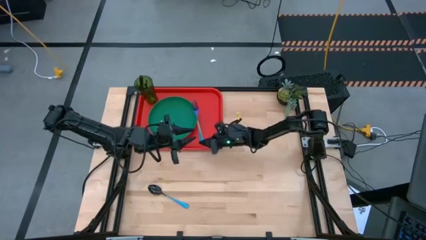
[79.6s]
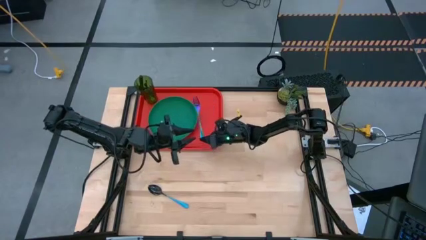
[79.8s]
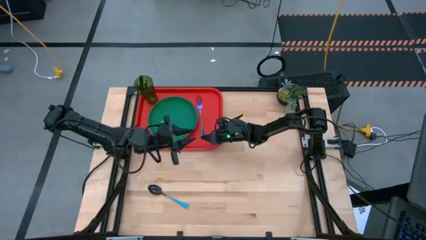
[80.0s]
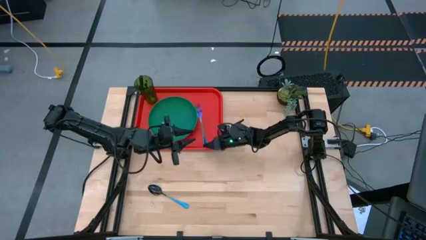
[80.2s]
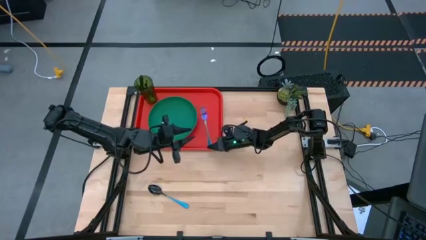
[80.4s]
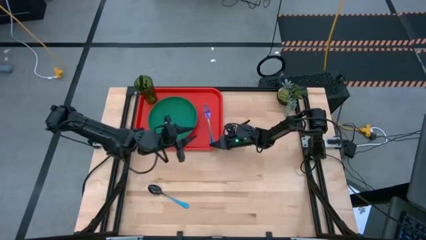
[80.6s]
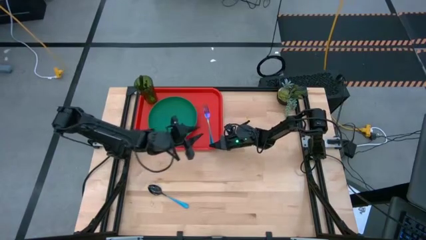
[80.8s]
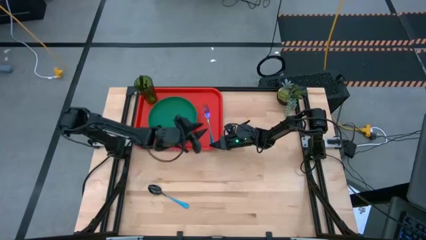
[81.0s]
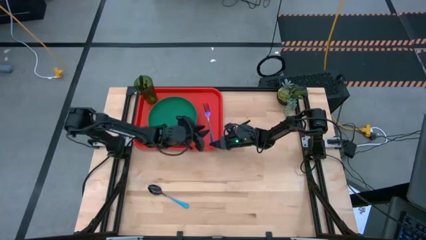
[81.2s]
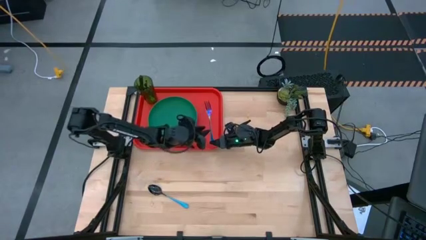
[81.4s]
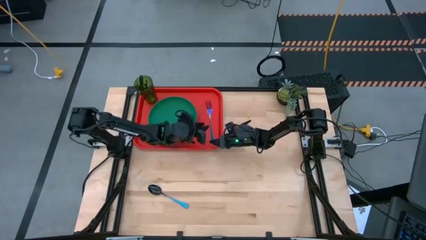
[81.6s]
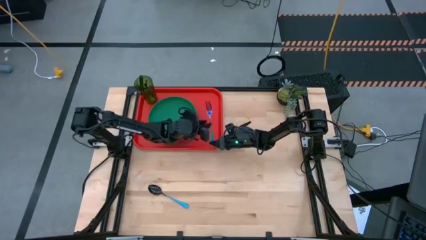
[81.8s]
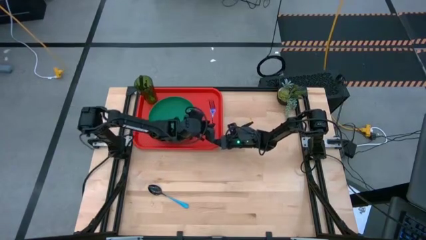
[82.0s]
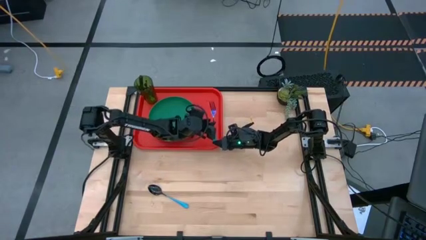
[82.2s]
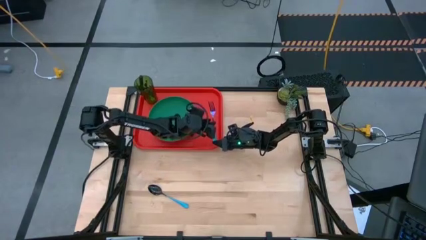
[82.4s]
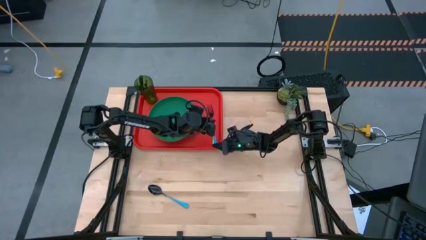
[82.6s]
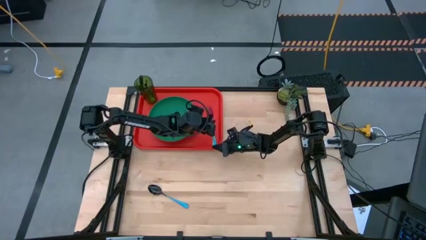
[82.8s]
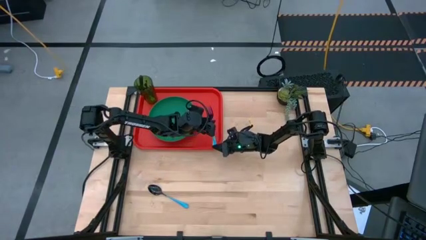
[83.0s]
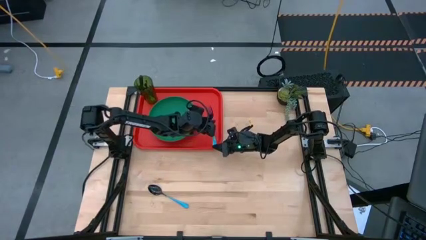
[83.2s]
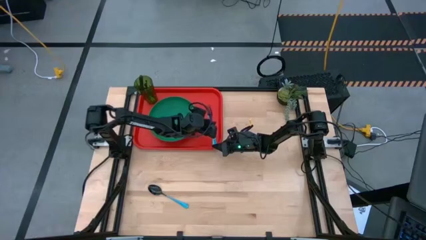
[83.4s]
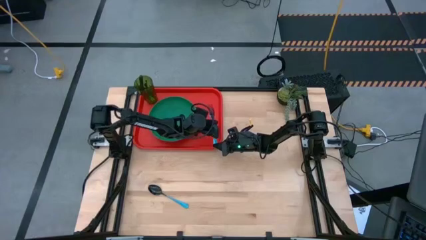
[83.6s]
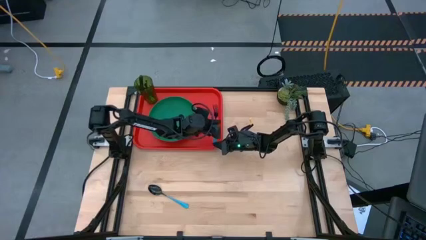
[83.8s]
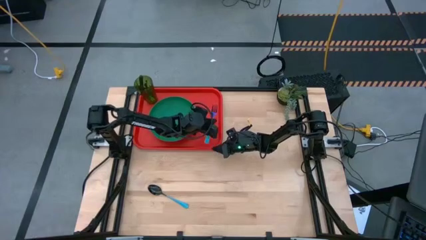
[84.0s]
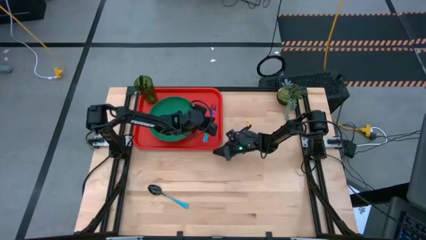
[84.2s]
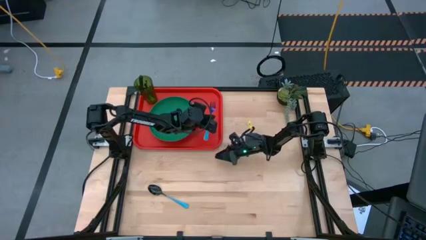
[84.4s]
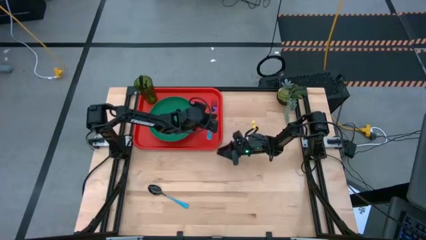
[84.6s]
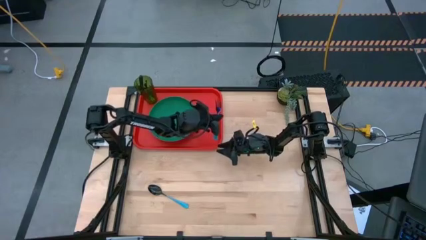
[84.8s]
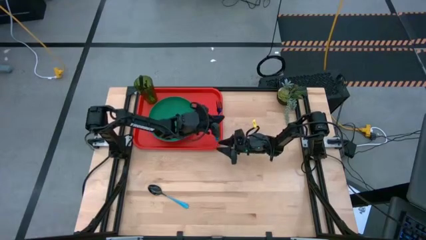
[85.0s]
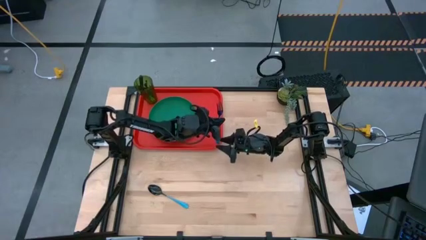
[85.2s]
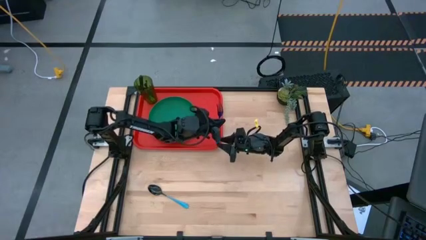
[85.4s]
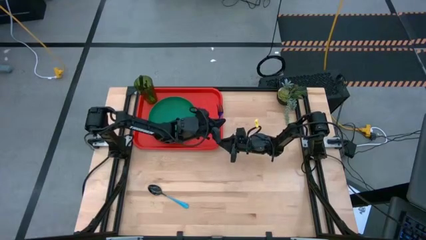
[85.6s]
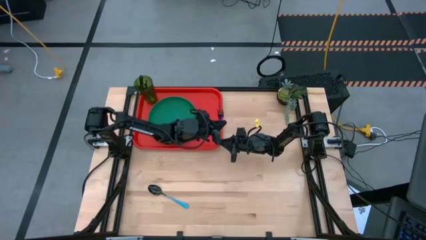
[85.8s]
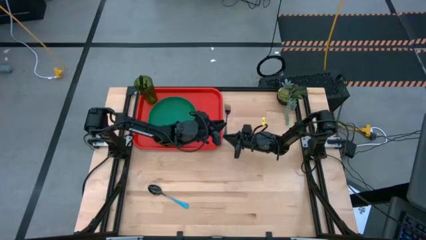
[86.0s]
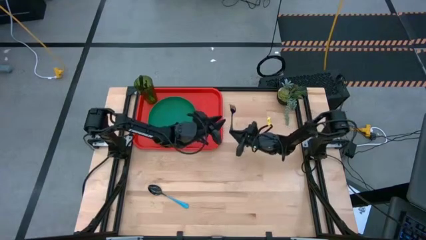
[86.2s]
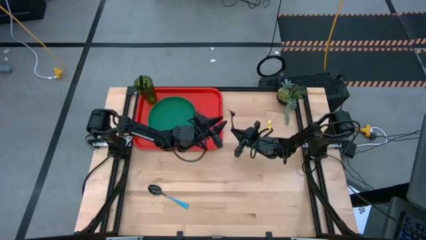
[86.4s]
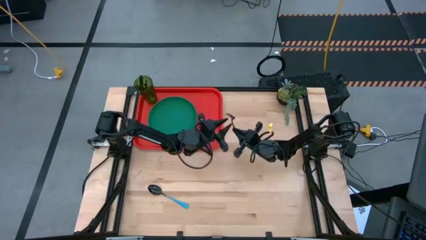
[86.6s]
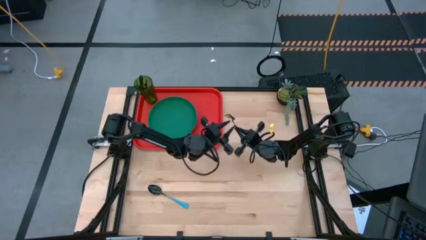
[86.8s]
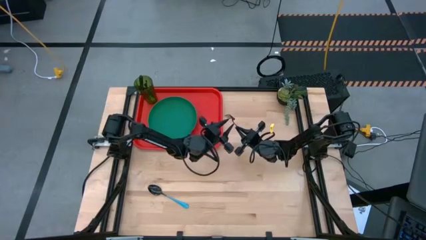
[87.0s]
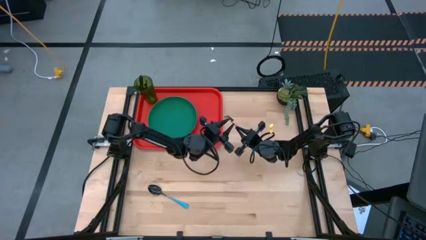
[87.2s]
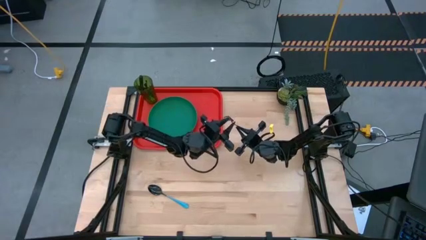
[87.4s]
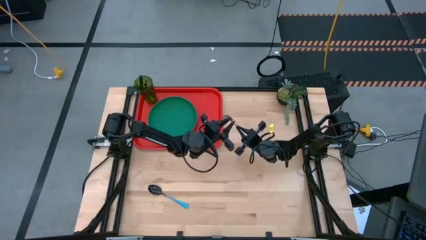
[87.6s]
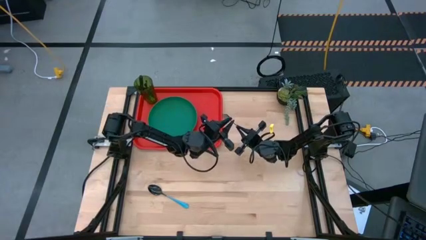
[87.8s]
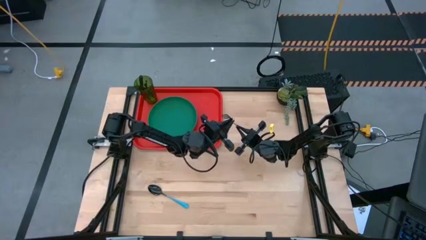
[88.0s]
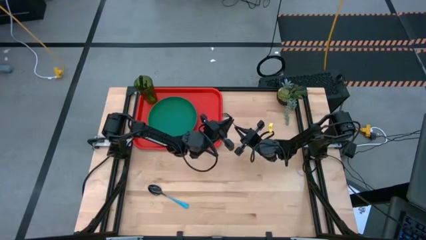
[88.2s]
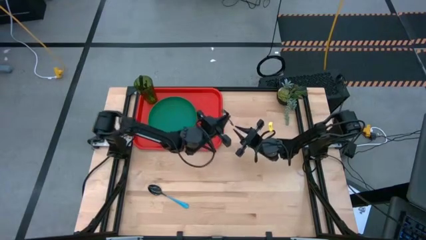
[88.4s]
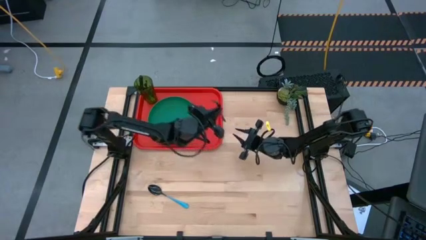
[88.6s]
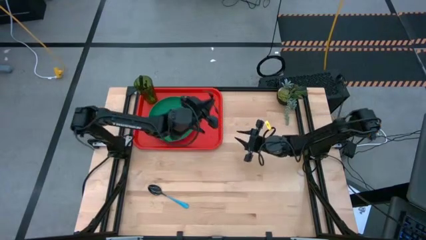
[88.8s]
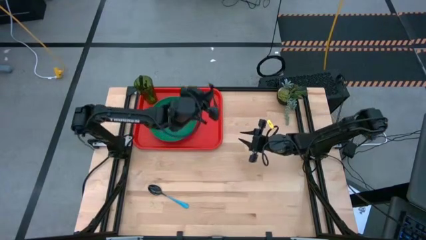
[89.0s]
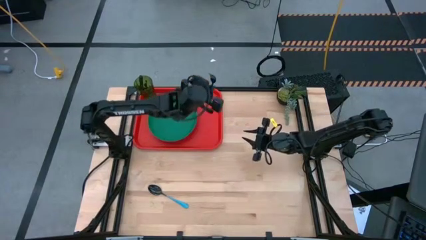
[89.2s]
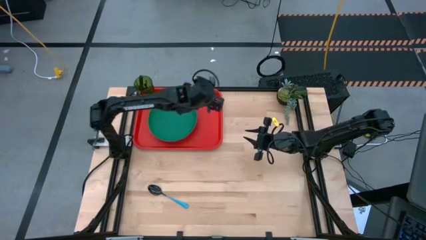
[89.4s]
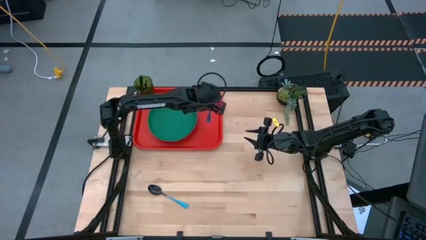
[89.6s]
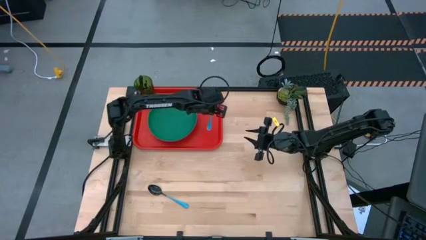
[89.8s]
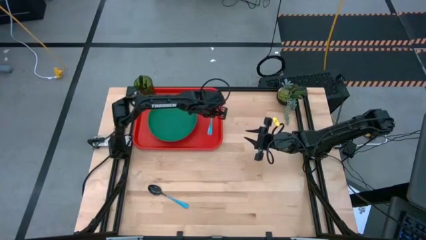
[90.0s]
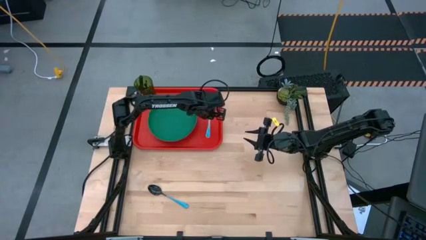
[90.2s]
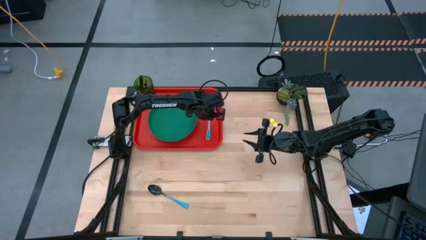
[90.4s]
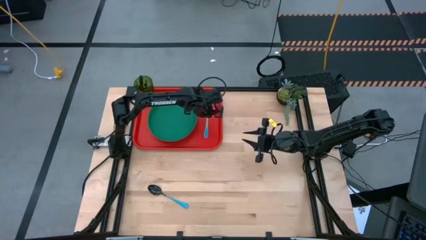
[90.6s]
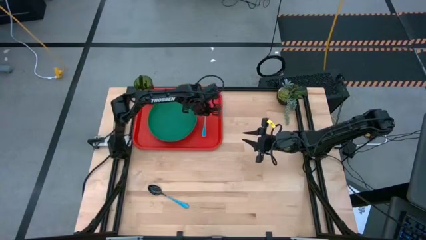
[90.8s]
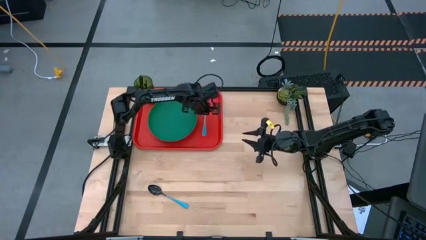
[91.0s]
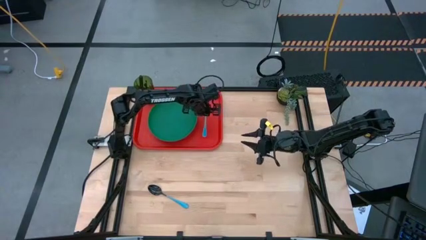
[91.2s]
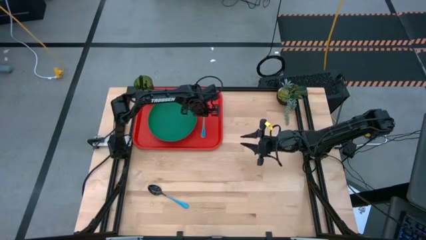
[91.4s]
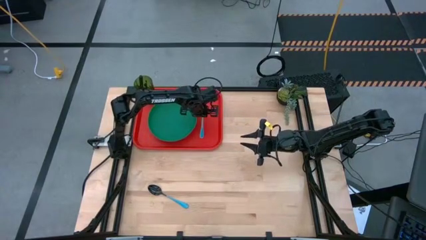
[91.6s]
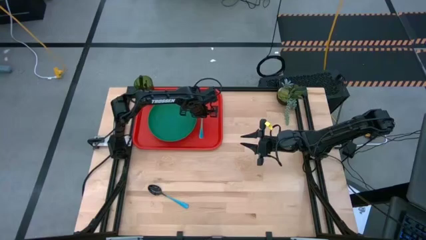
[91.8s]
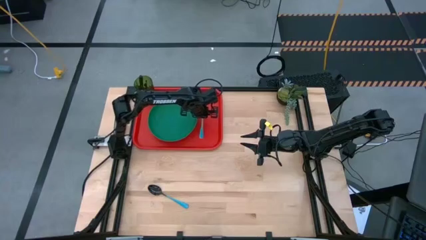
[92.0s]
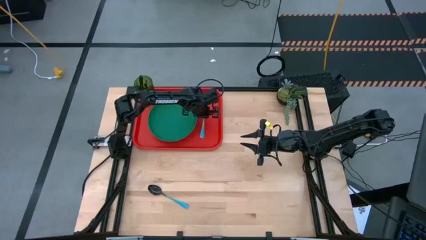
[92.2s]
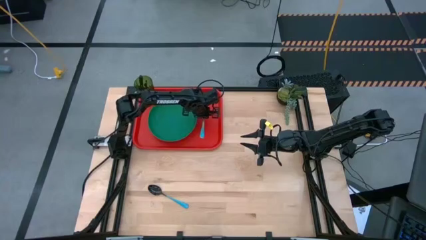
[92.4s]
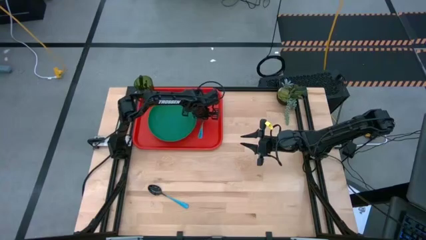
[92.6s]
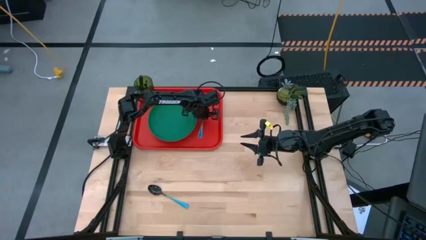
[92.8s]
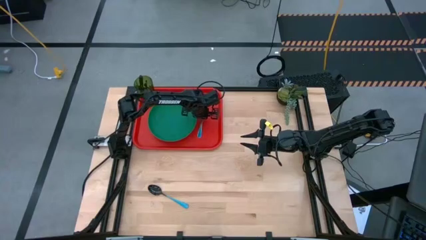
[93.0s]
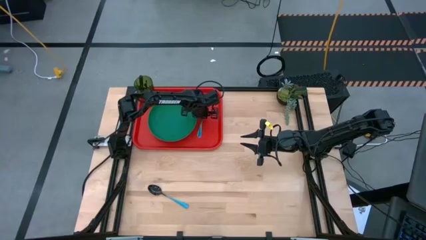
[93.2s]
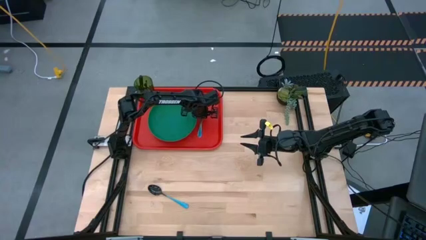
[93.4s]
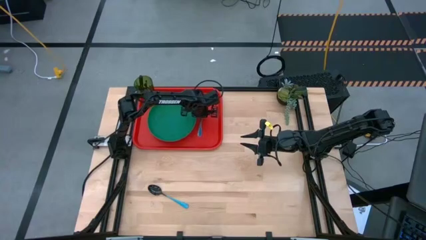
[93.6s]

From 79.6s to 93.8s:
Task: Pick and place plate/cup/fork/spoon on tray
Put the blue fork on the orange tray to the right side of the green plate

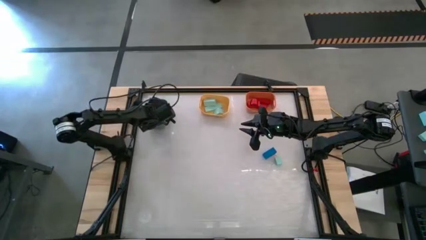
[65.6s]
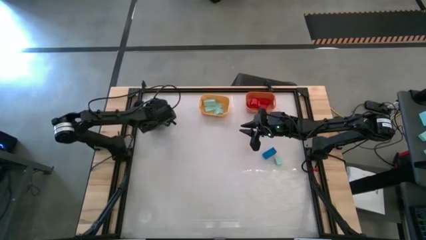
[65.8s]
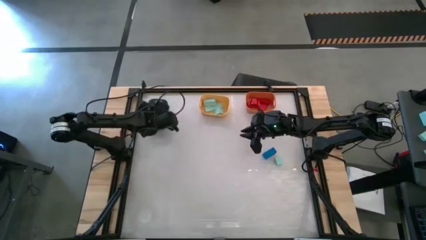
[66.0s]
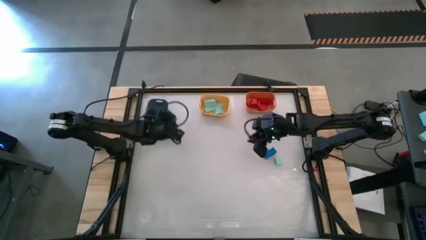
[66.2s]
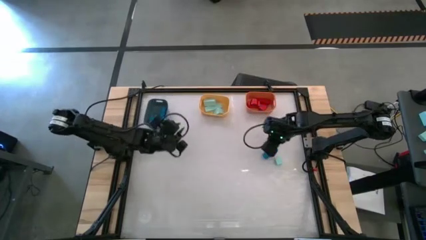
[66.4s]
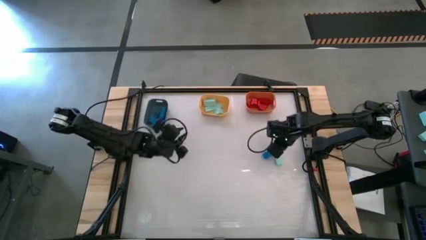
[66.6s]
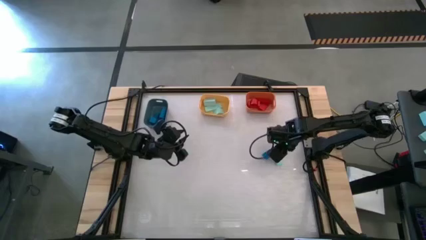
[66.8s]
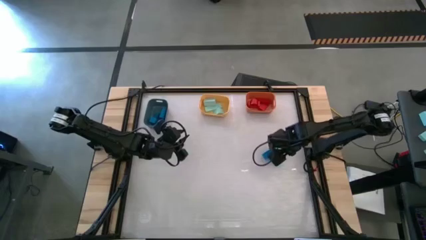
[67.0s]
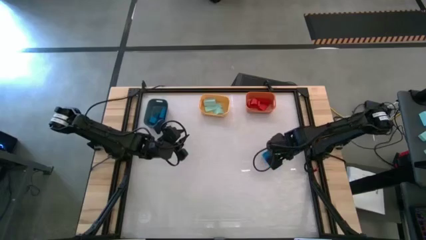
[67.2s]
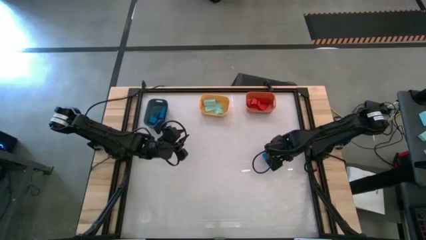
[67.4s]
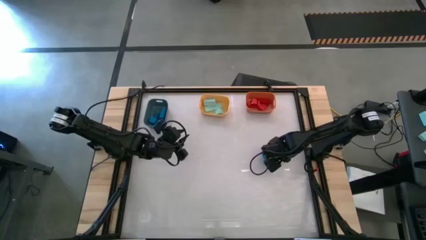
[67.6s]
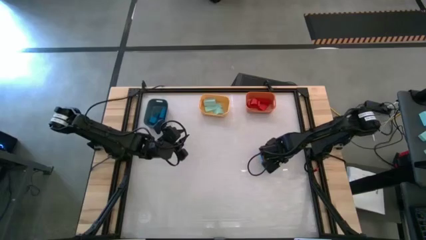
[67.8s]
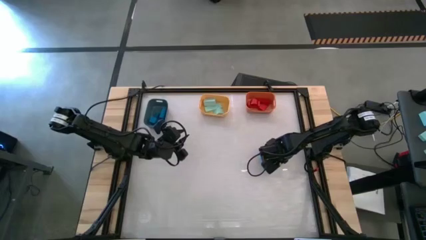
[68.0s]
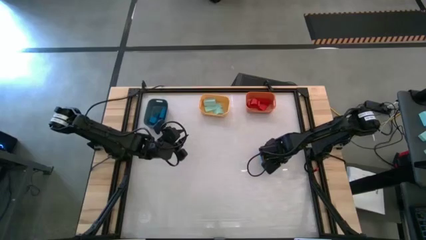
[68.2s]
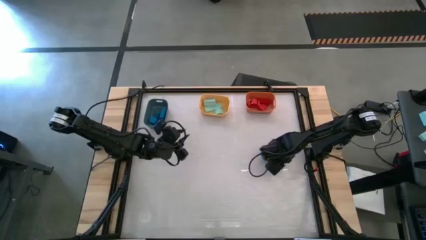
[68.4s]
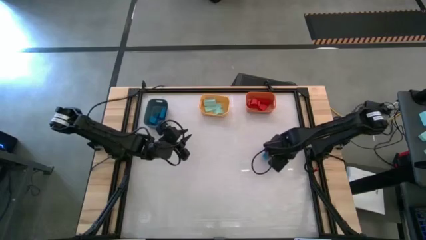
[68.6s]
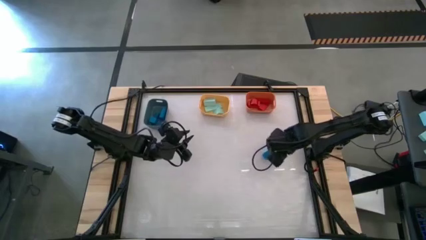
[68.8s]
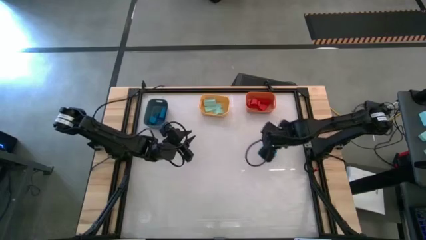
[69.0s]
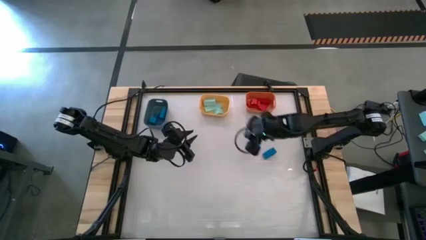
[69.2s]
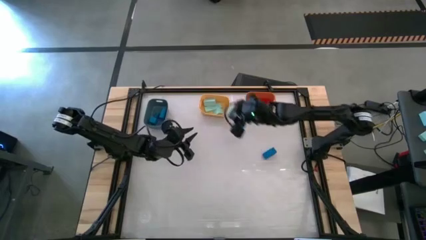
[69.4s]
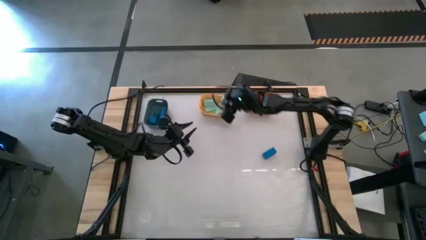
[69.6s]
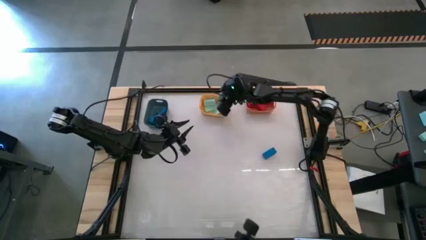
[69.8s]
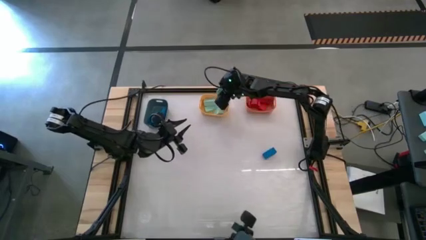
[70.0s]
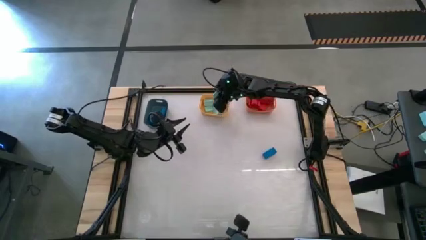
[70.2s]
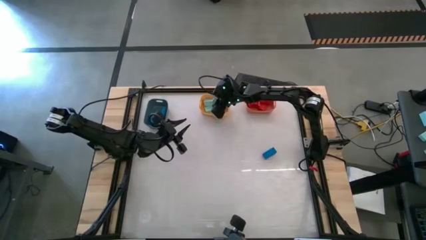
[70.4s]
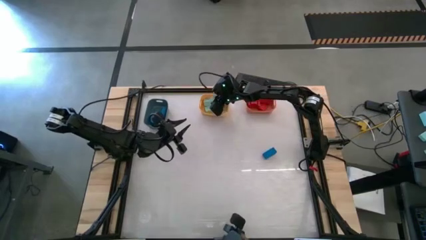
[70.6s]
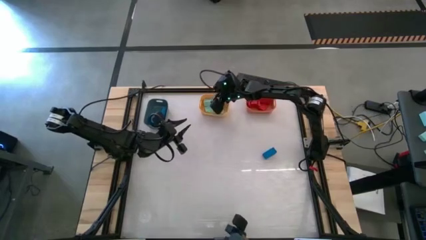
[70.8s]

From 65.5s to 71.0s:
Task: Sort & place blocks by color
Put the light blue half circle block into the yellow bin
